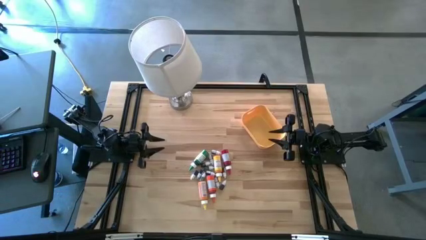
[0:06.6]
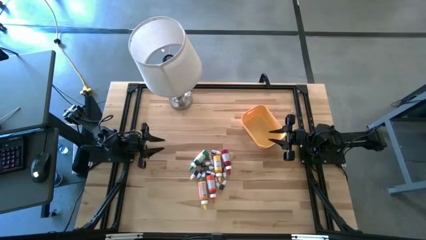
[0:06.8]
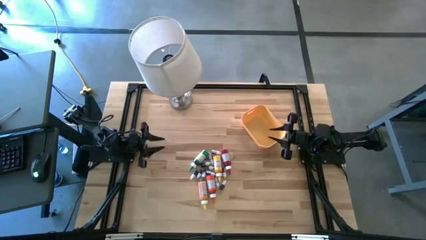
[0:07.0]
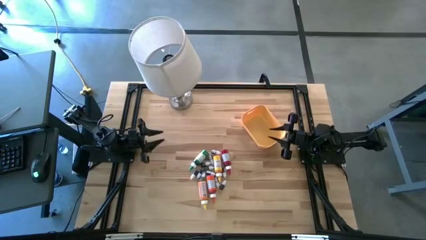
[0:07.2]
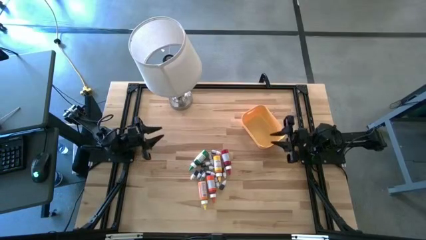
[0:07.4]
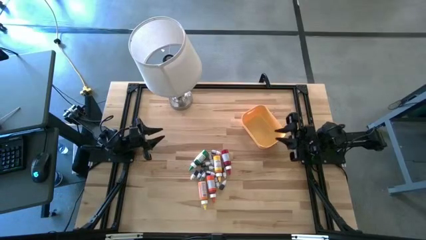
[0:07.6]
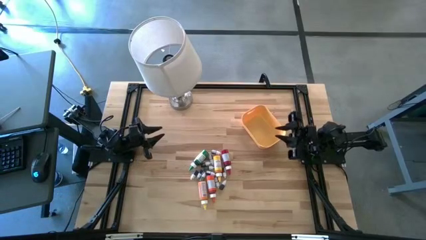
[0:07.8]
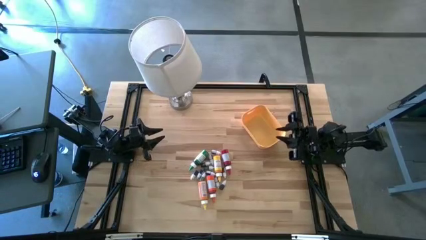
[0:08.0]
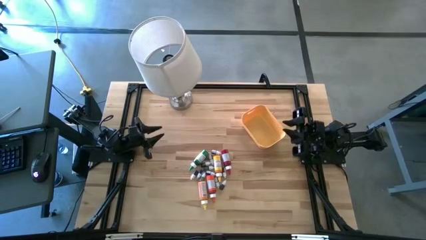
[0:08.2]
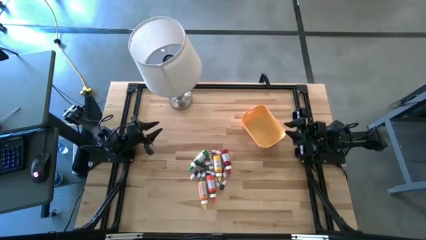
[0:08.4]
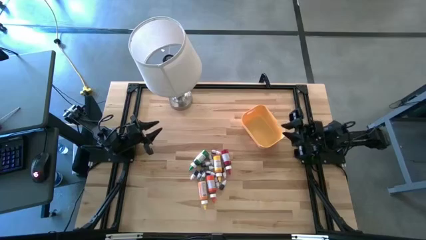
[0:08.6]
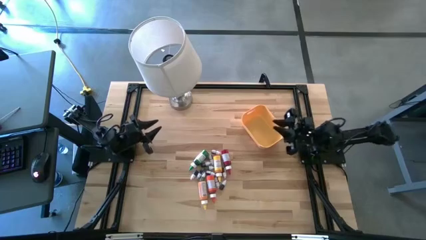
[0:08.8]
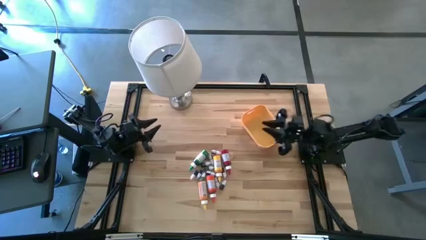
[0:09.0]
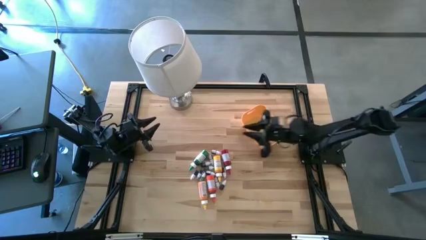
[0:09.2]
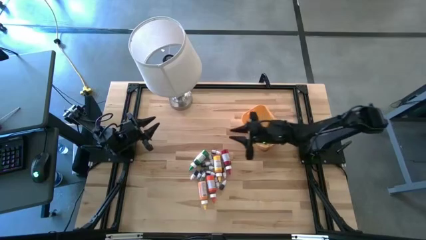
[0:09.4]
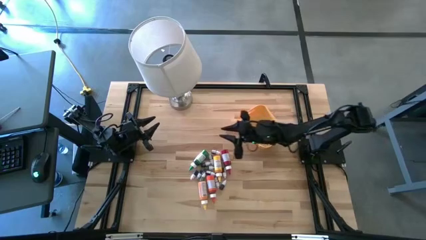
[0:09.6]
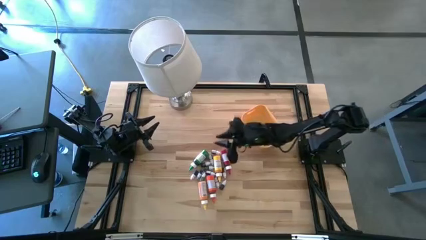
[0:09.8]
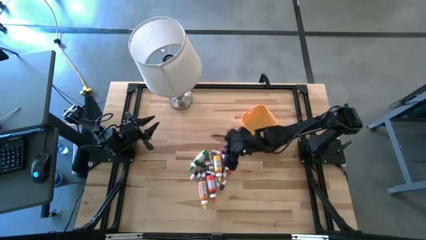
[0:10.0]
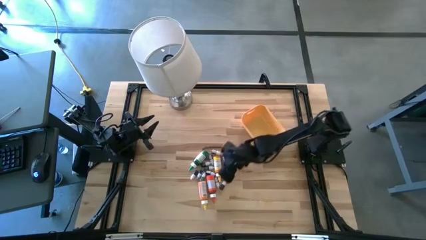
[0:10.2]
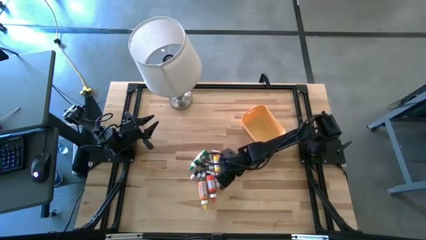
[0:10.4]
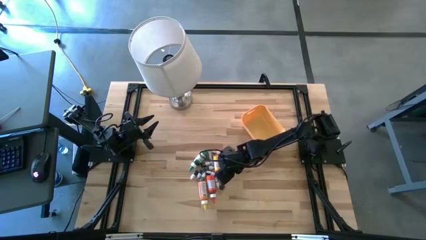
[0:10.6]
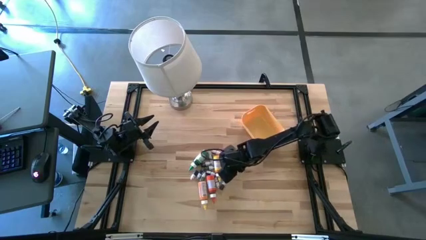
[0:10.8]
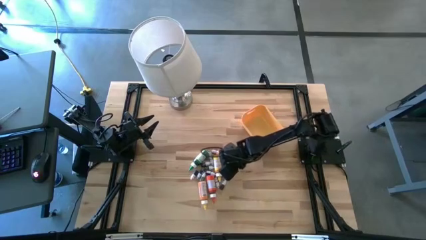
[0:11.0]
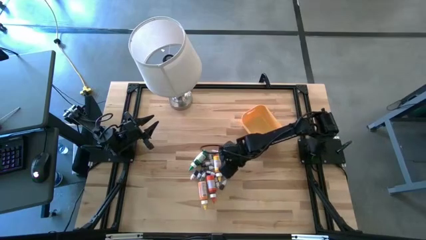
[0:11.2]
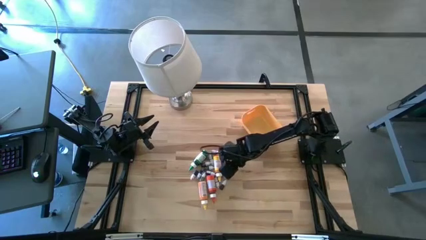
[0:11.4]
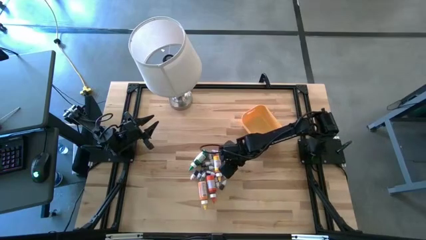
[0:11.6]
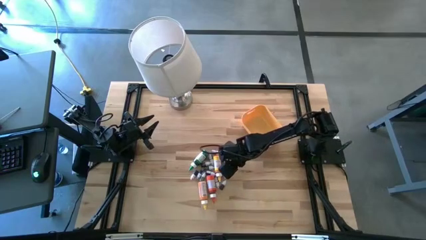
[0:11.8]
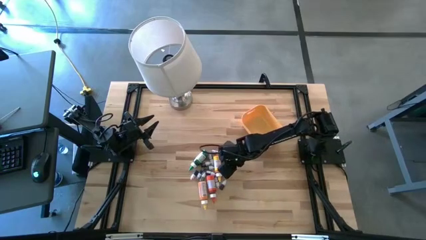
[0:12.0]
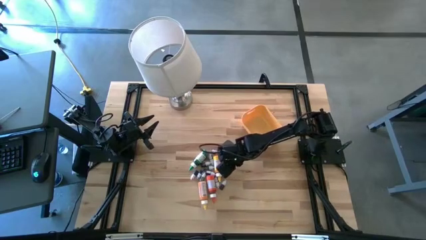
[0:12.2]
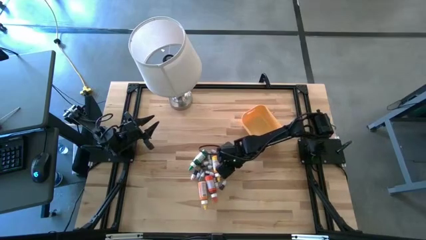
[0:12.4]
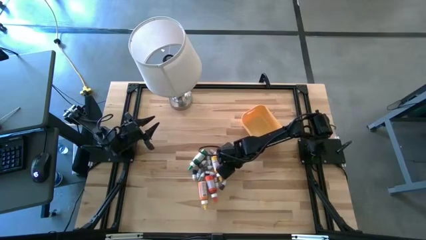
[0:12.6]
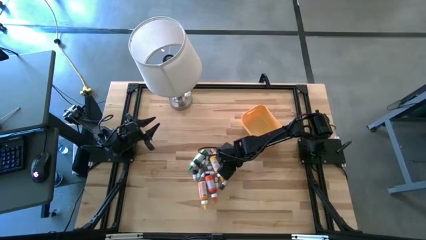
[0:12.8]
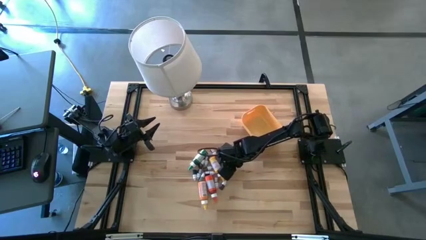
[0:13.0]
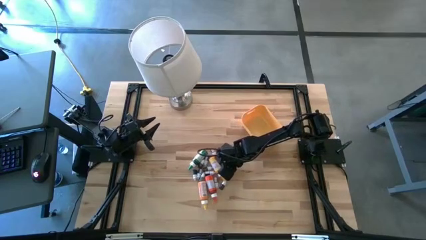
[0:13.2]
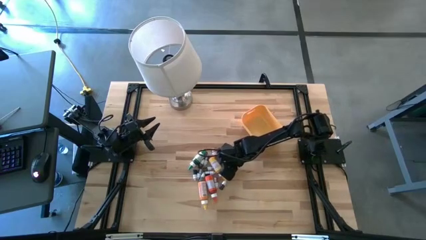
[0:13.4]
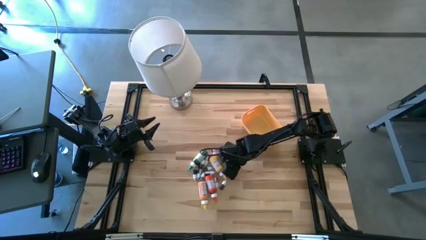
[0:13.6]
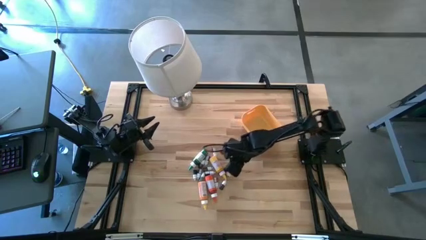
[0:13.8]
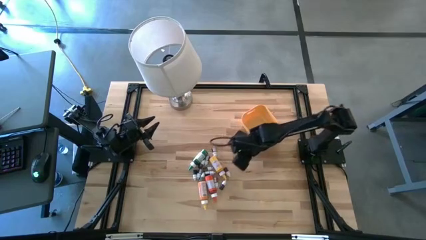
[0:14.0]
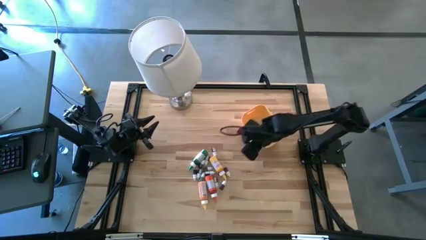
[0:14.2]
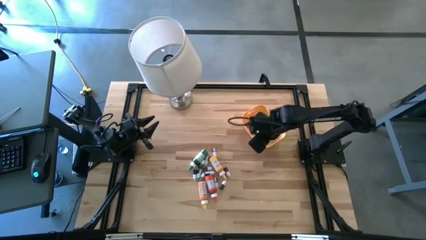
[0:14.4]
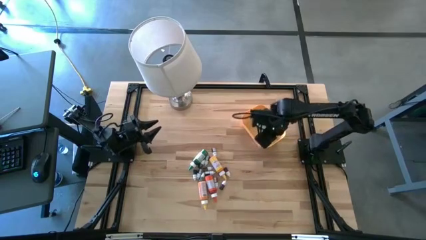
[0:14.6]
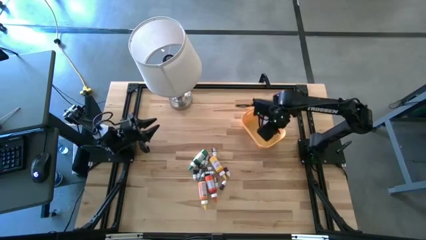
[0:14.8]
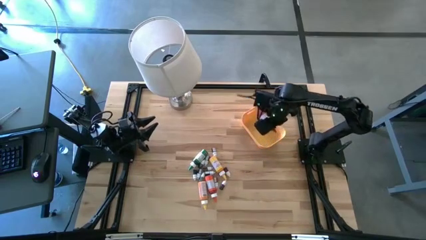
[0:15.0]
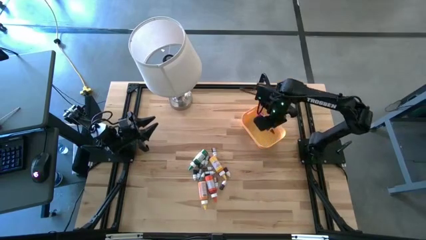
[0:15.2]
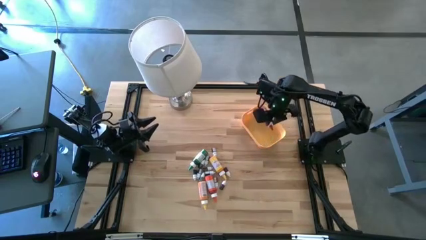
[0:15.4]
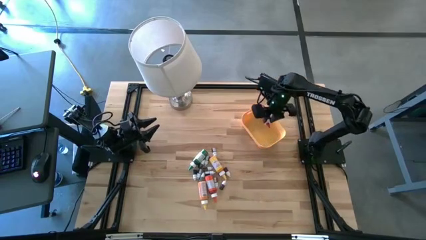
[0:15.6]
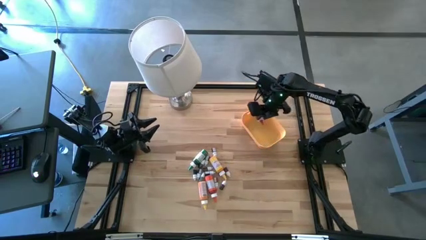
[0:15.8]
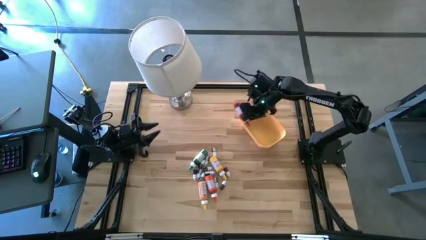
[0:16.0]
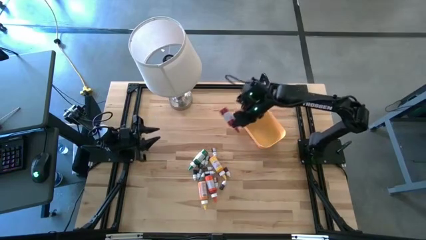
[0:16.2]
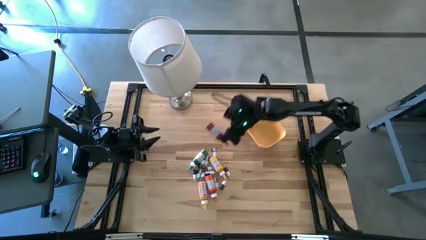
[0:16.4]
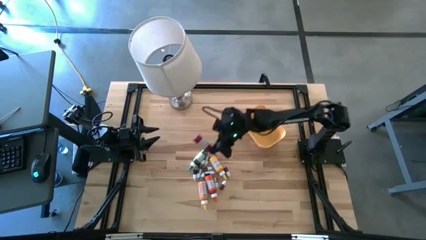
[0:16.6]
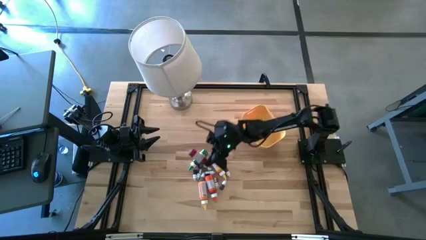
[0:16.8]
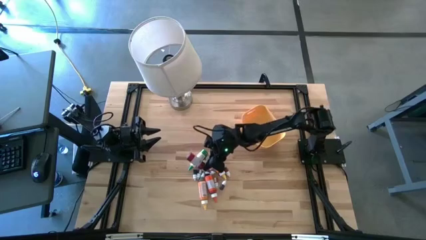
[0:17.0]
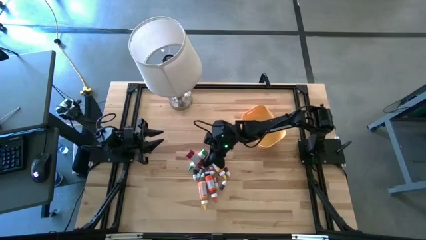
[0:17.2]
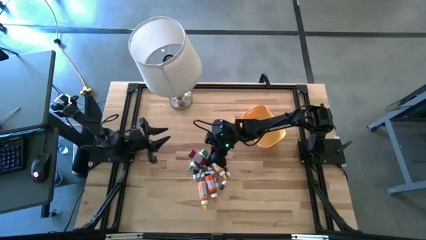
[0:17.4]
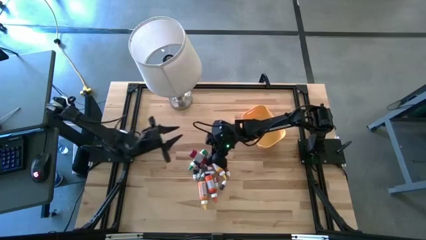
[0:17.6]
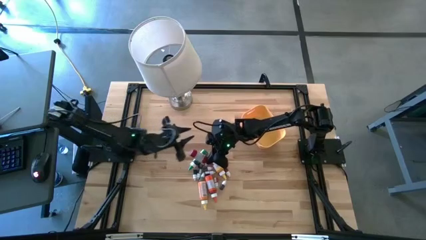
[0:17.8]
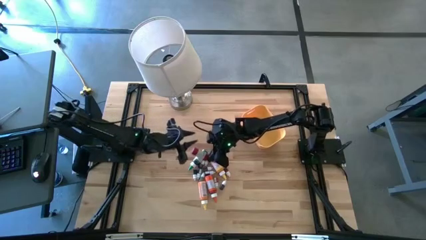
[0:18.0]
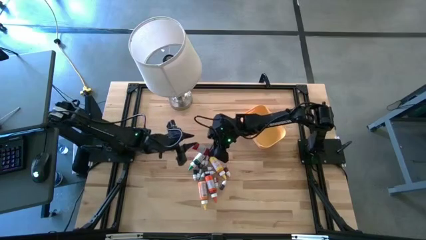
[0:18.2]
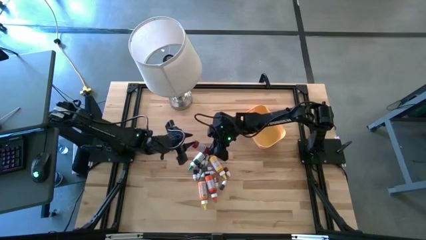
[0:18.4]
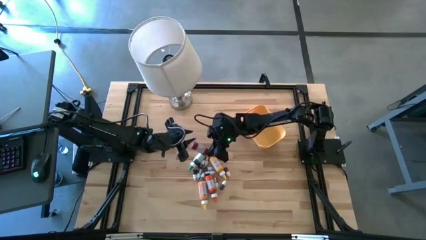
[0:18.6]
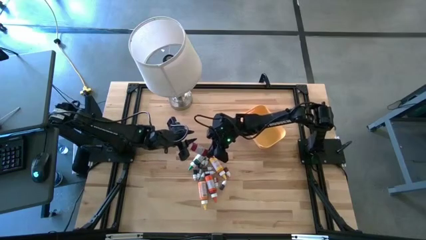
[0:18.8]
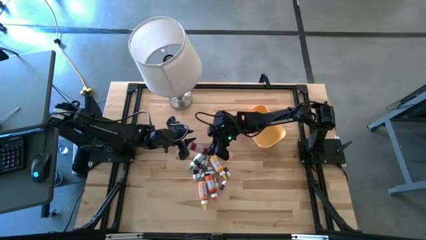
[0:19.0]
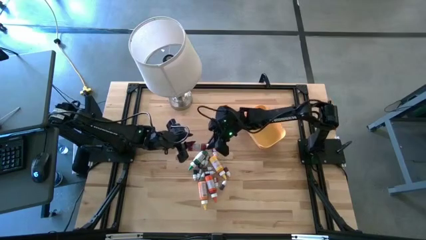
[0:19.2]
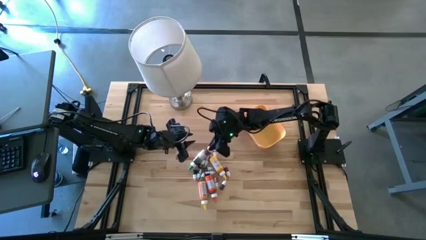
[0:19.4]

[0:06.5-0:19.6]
Task: Pick & Place food coloring
Put the large red food coloring bottle into the yellow bin

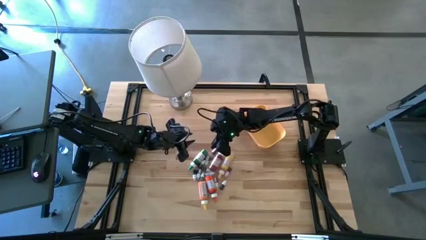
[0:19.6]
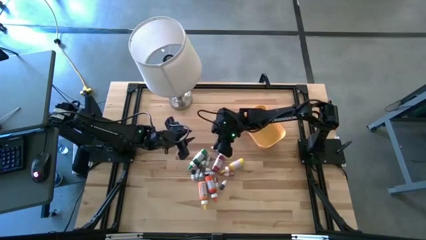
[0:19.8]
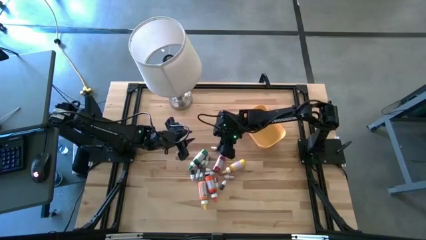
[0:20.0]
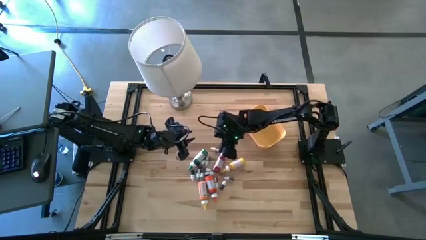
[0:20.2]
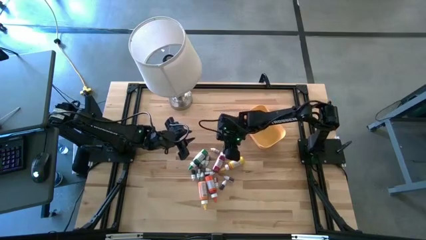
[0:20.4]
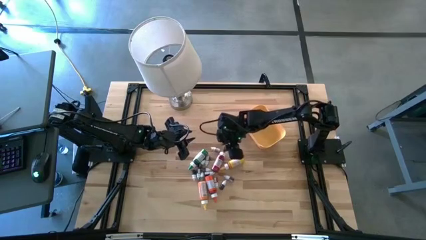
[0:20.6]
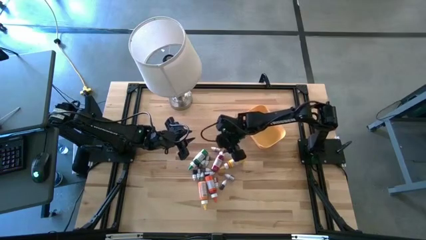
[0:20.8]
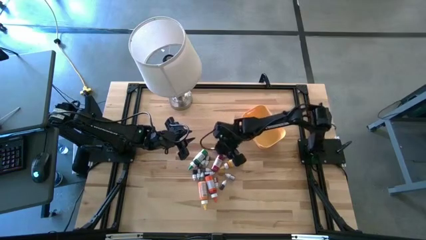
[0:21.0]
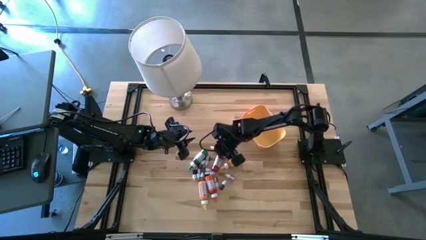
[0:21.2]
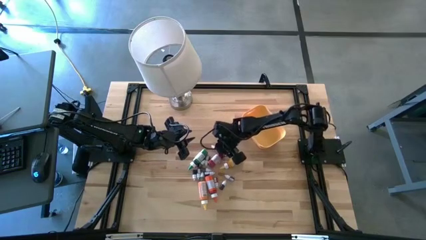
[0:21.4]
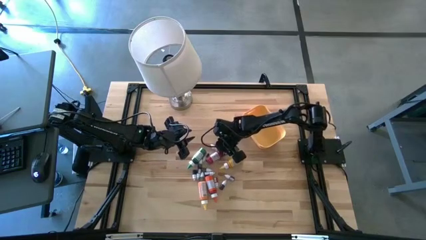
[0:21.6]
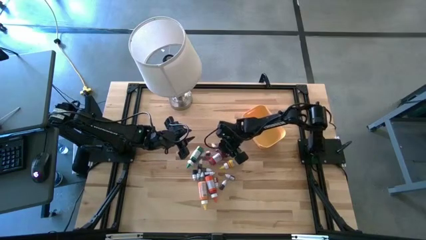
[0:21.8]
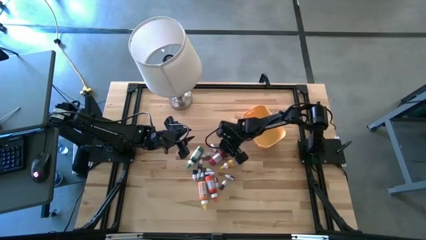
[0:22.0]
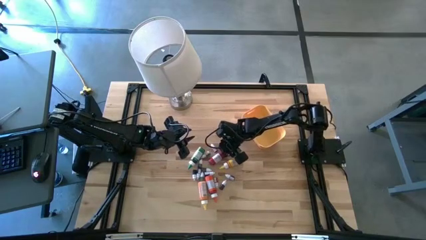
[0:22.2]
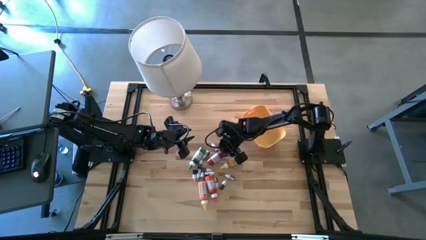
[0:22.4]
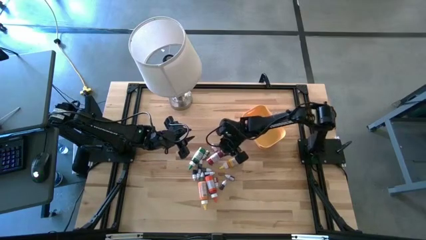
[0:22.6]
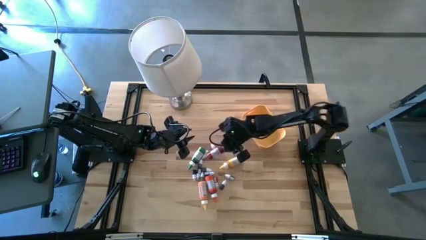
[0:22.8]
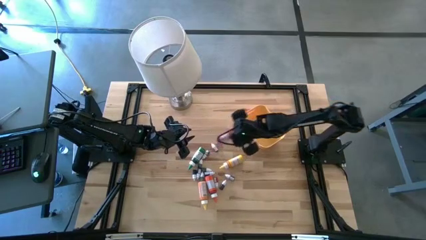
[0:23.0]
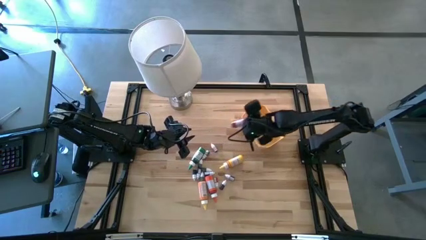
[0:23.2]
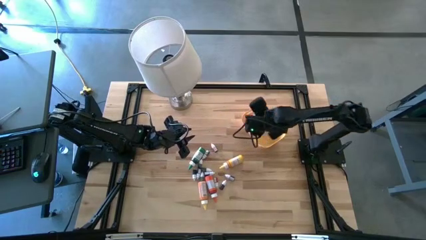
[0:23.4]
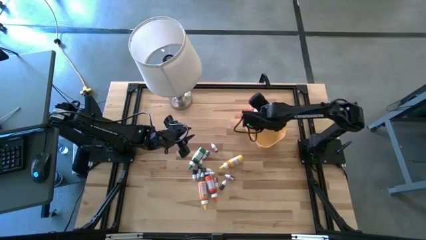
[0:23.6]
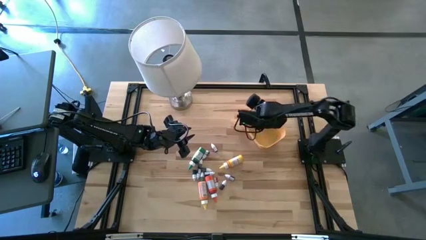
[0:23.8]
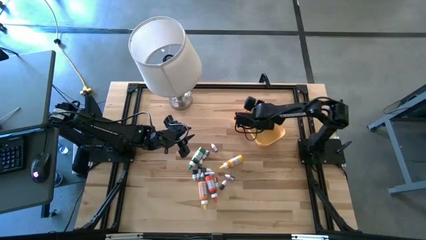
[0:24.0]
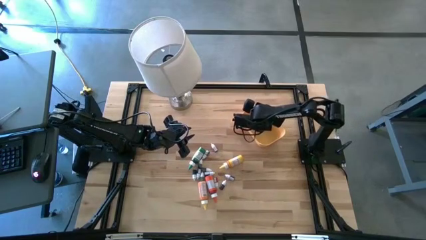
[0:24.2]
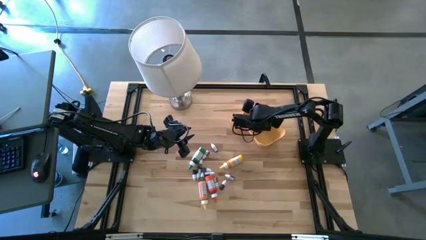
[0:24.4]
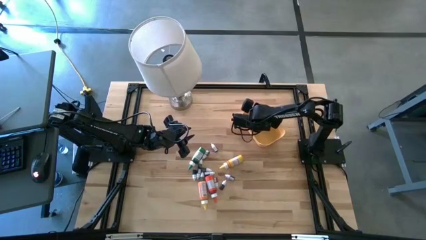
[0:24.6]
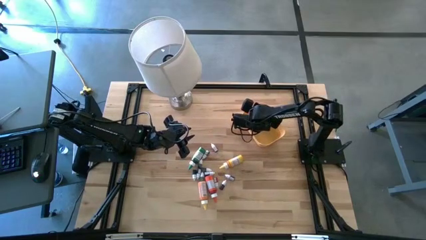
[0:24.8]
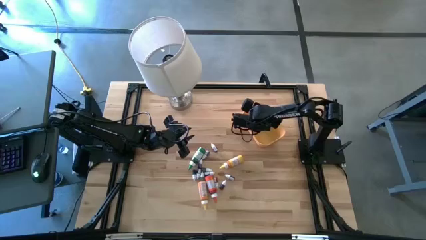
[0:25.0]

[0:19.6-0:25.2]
Put the large red food coloring bottle into the yellow bin
